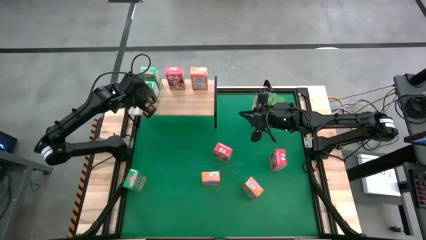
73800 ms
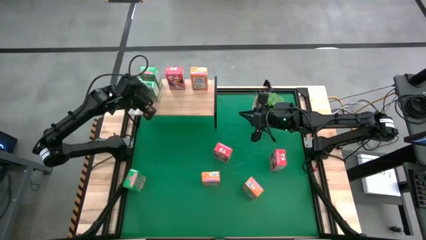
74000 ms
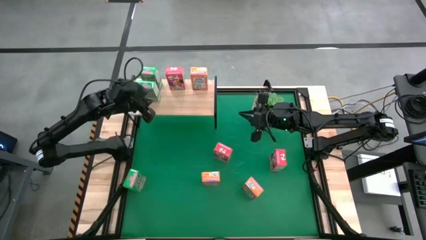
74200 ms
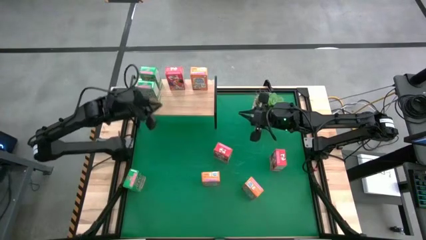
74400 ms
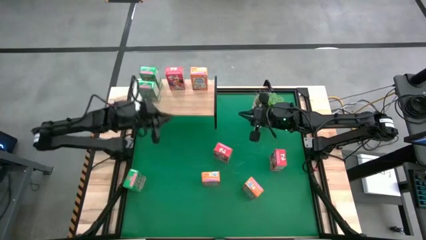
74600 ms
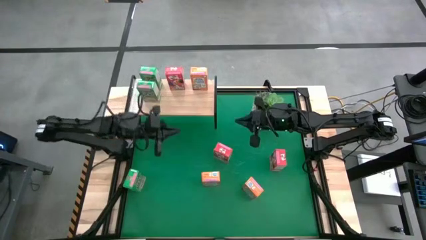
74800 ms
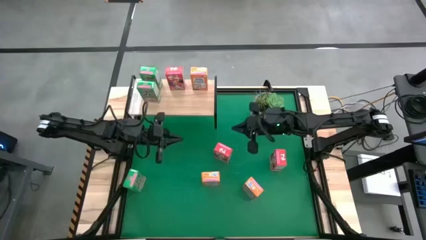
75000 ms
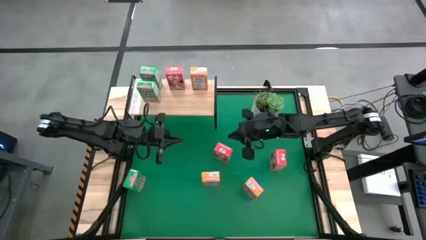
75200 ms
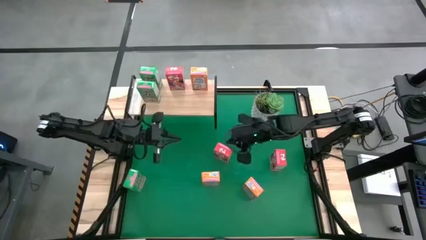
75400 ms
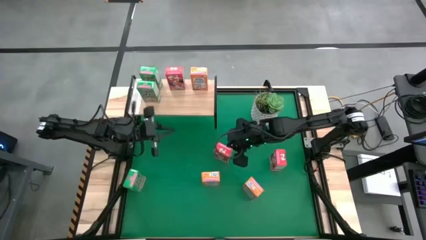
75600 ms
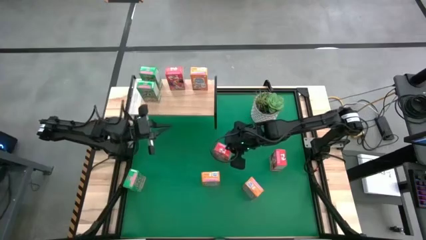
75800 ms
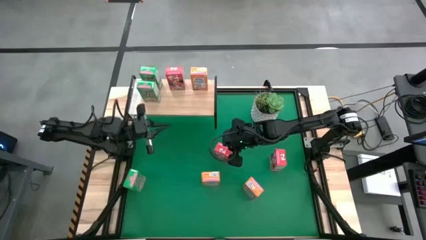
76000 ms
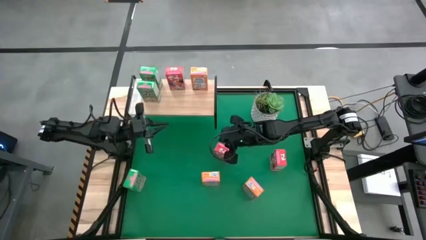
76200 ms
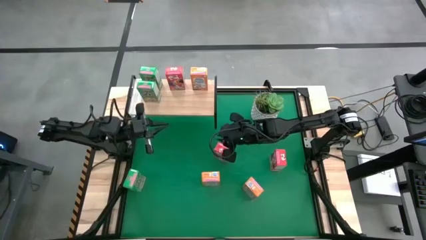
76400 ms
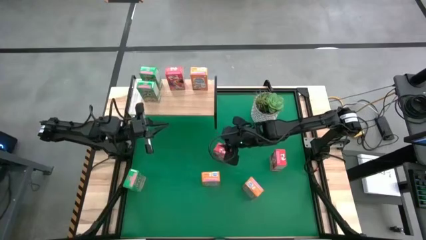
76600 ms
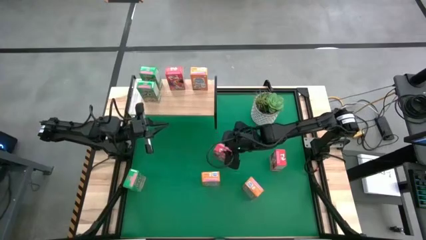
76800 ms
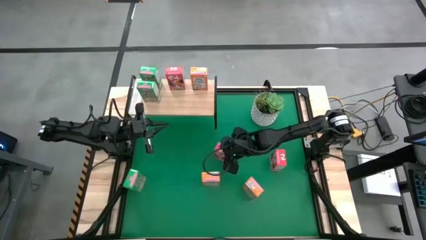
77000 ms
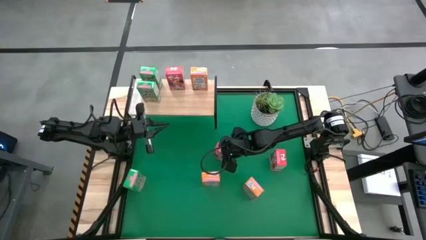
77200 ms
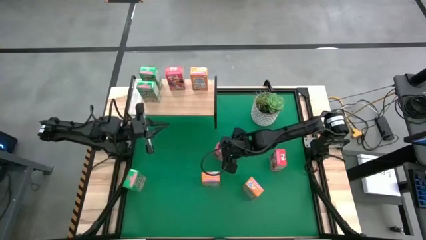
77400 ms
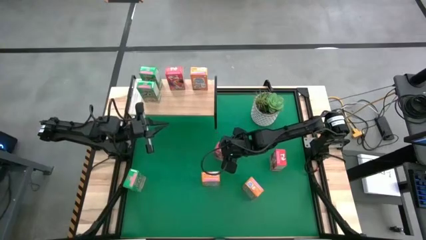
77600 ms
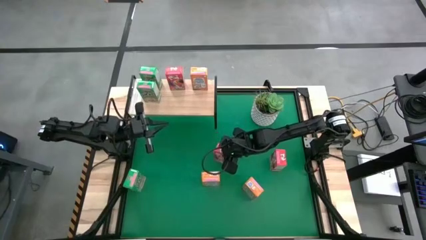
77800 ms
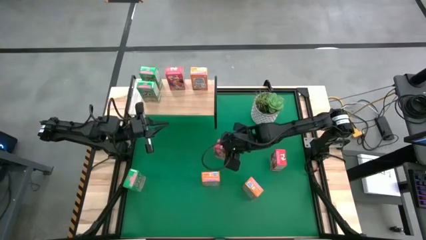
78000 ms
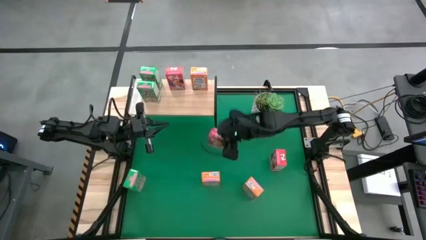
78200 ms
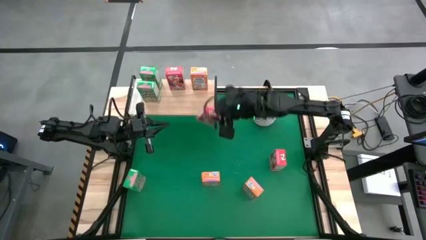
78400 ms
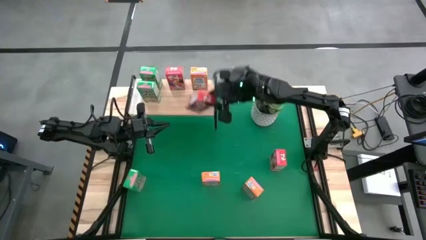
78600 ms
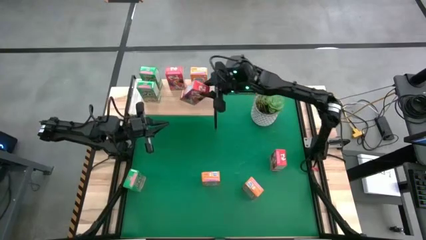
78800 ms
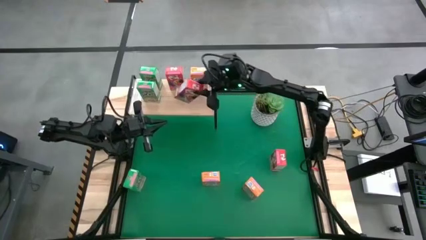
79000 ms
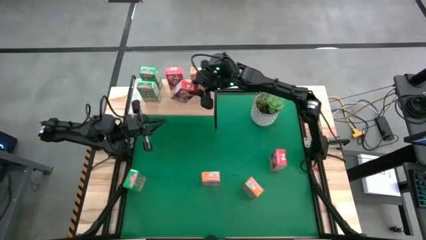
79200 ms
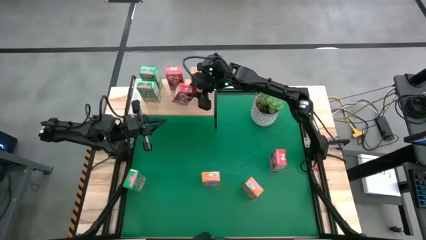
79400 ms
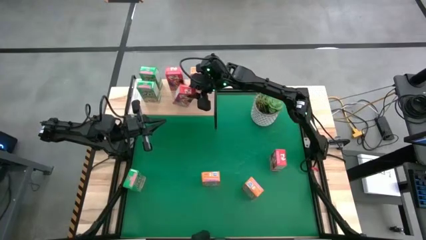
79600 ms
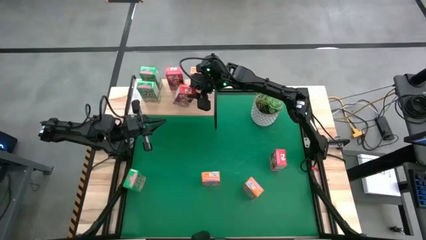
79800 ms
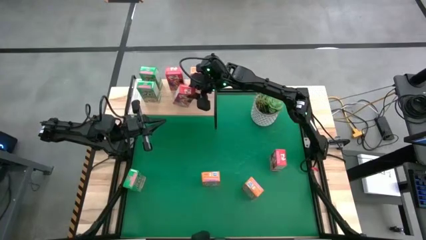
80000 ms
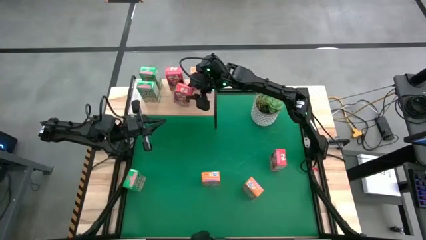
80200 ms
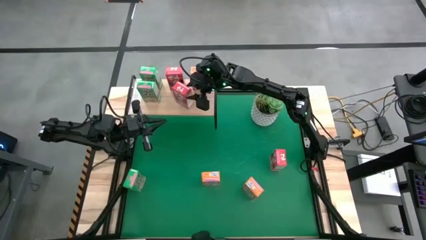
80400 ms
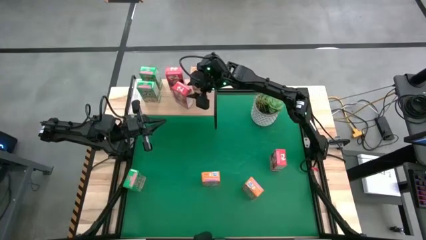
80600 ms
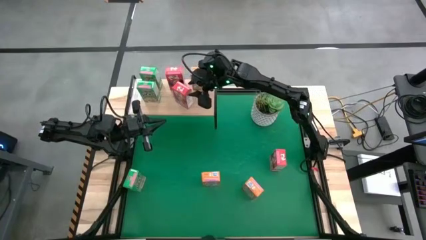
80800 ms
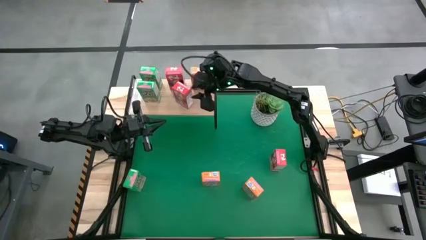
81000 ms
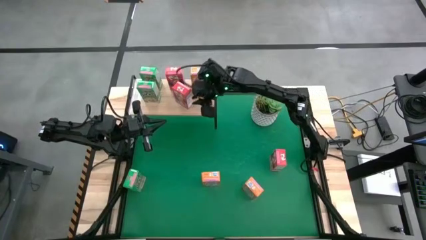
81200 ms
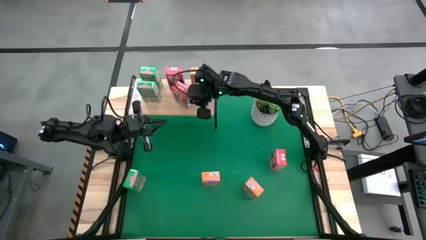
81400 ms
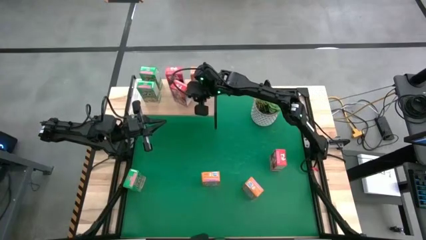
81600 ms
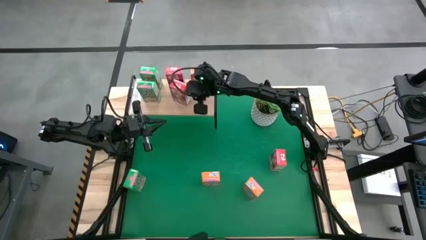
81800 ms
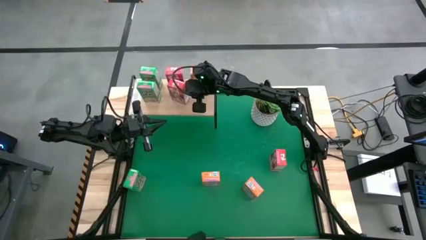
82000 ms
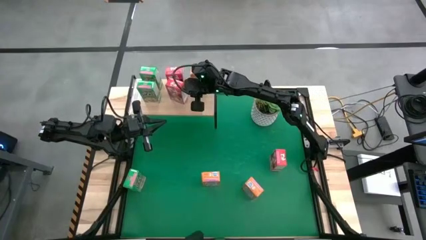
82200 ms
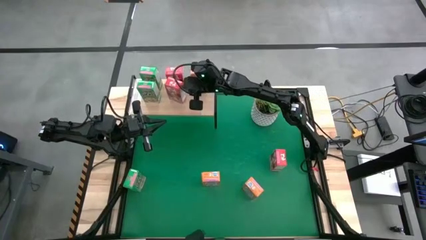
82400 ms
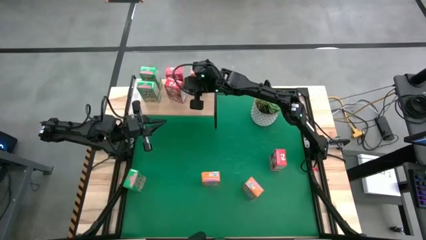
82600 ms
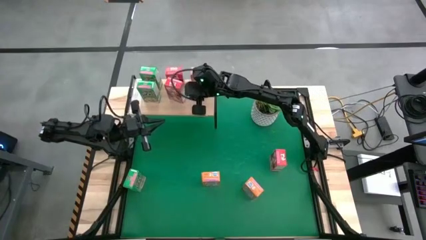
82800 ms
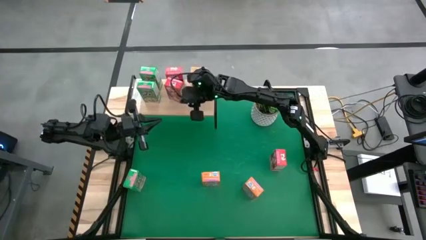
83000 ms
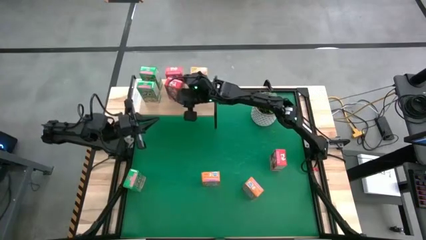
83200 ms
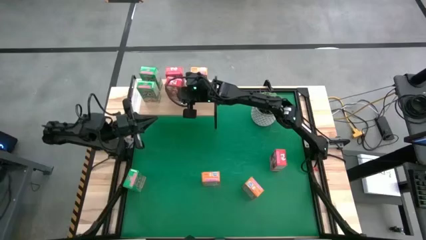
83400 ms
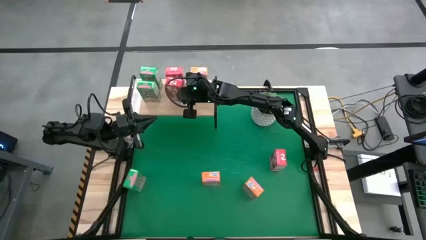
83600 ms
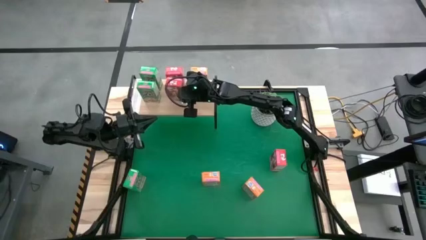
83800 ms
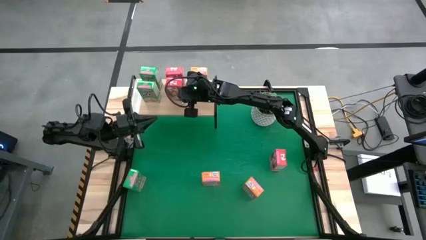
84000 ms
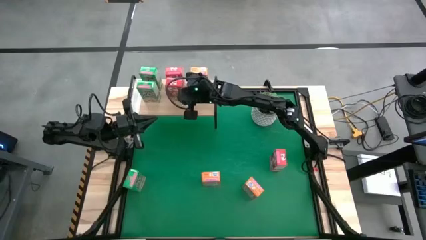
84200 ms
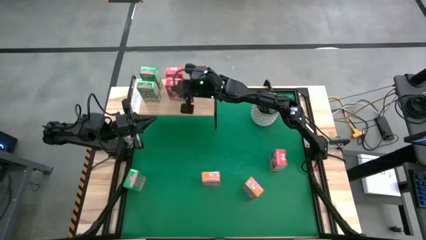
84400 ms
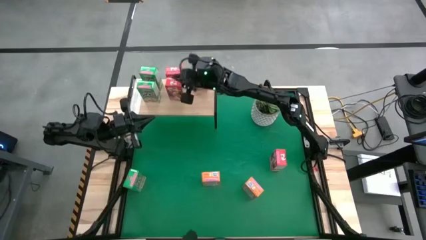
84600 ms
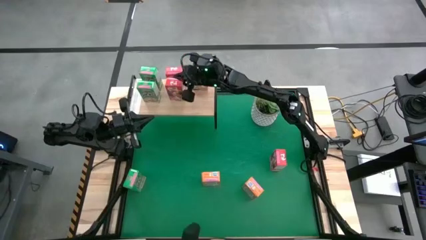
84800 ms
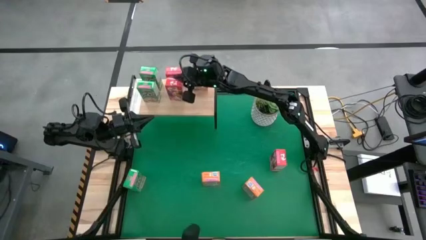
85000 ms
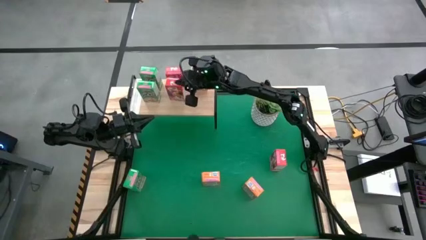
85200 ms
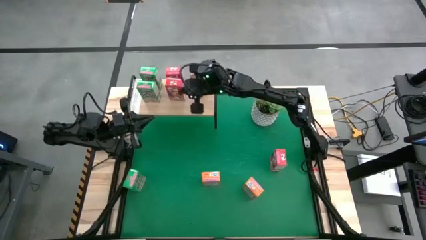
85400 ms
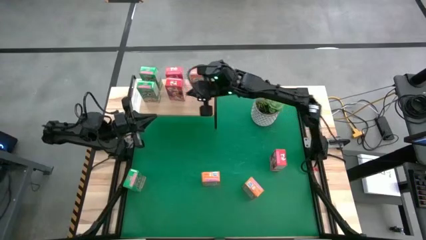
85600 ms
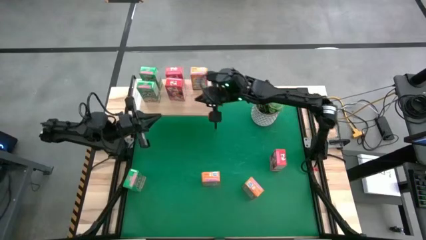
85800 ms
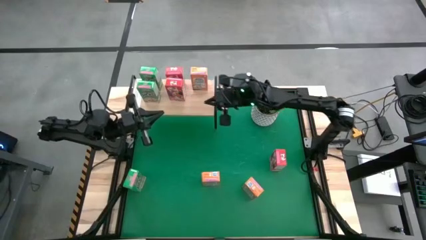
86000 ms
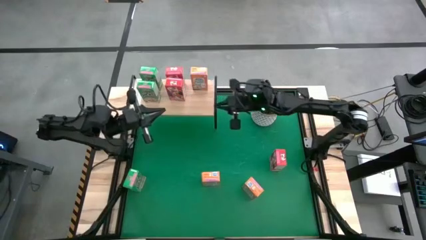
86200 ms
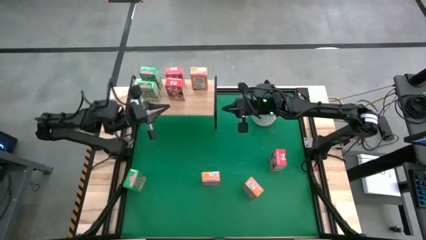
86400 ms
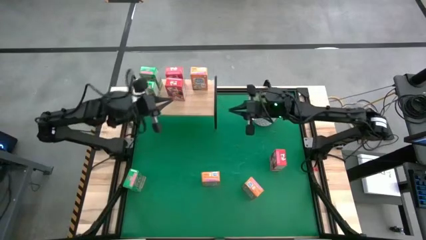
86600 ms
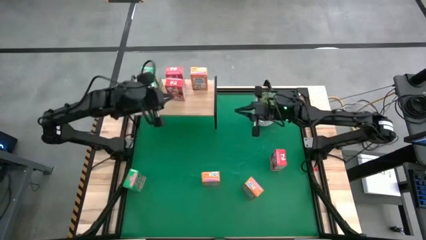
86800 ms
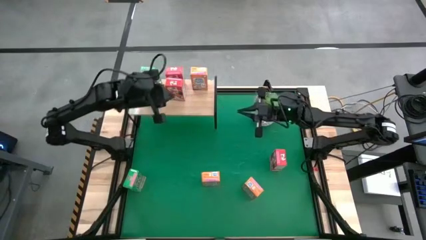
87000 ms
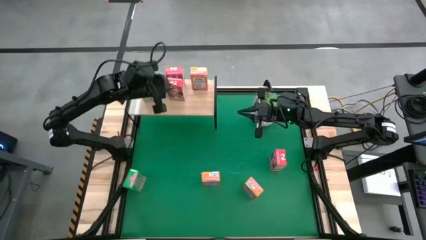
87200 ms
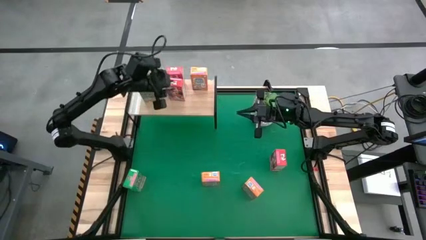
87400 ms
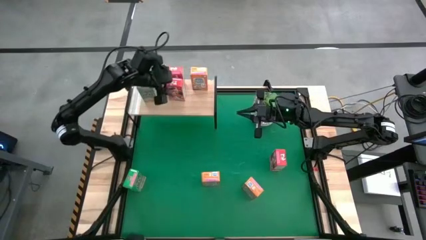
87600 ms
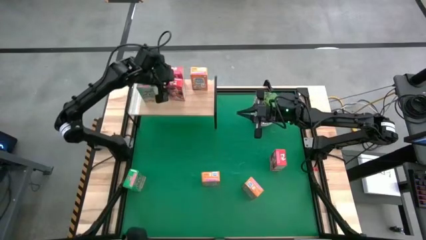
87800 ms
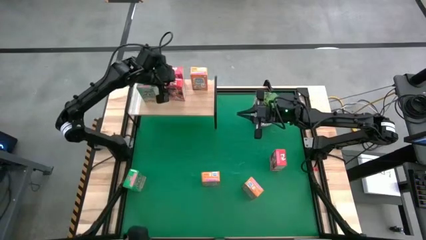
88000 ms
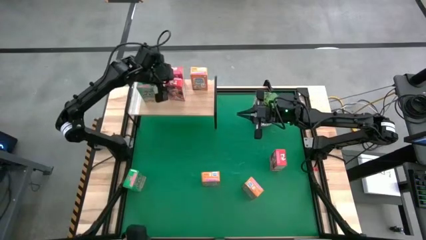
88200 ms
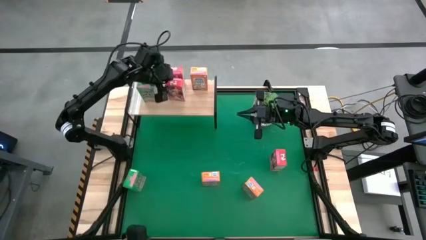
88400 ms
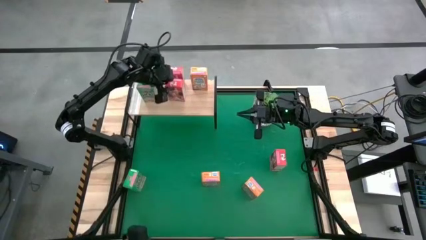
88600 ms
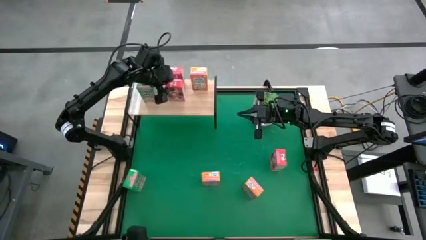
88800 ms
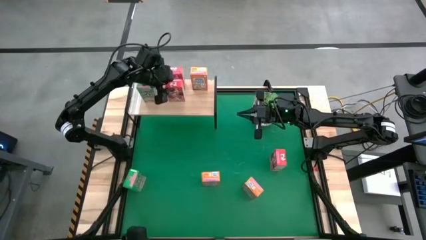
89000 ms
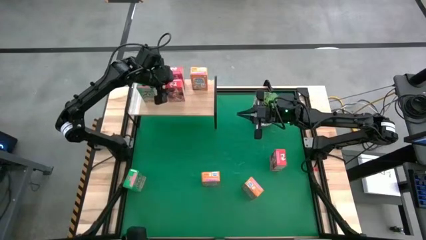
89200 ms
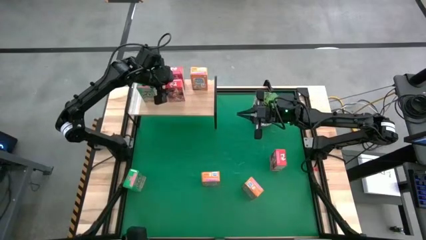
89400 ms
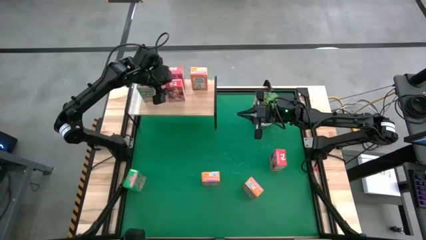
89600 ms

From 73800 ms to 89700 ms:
Task: Stack cereal on shelf
Put the left red cereal box on the shelf aligned with the other red cereal box

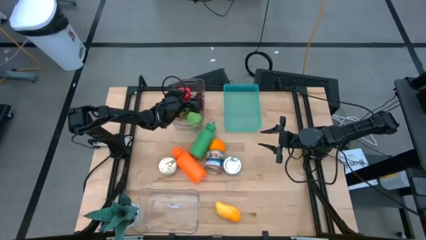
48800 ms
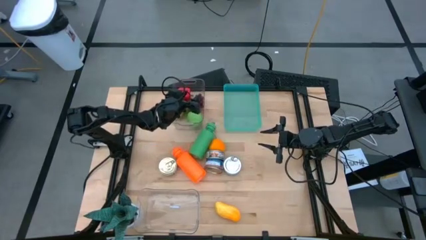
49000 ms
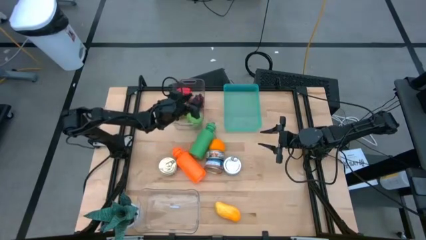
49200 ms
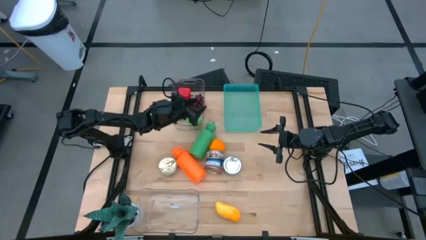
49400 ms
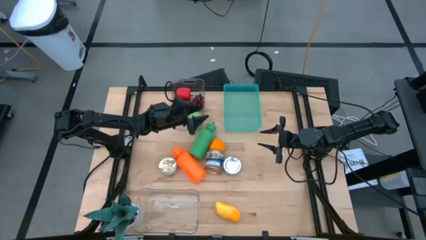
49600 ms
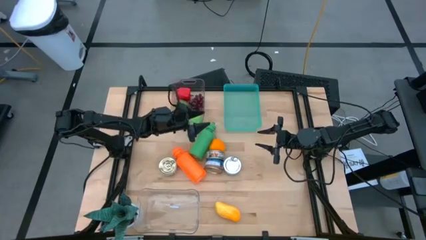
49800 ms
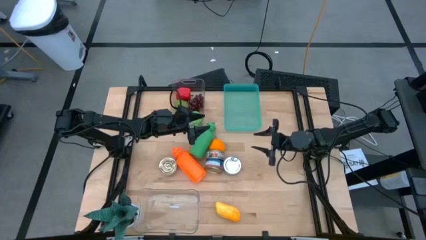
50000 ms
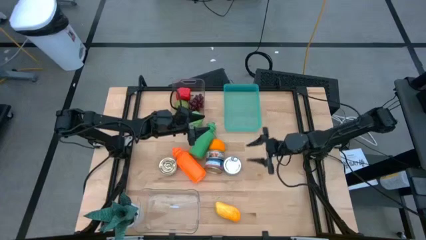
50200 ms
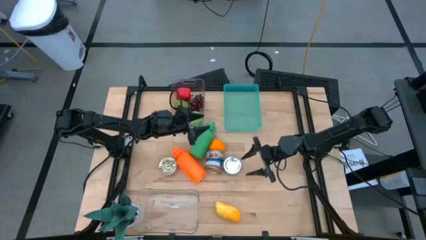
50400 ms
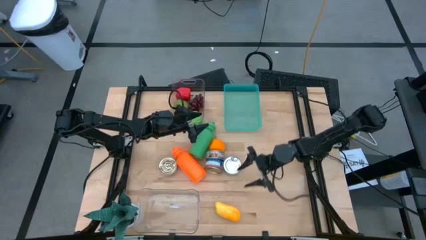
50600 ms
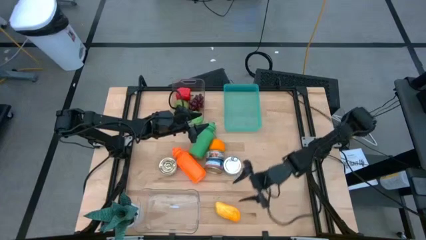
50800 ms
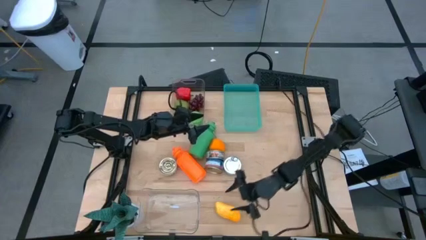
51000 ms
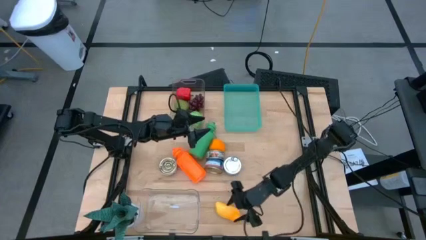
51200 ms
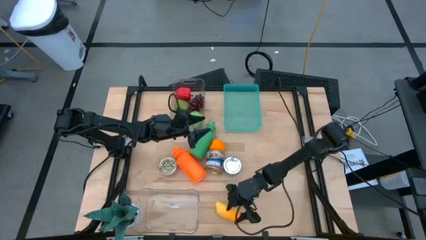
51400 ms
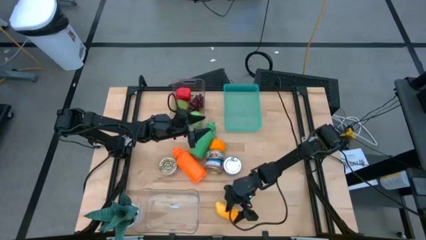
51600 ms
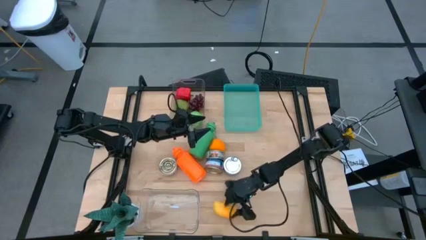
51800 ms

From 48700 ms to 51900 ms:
Task: Pick & Place Food Item
Put the yellow mango into the top transparent bin
